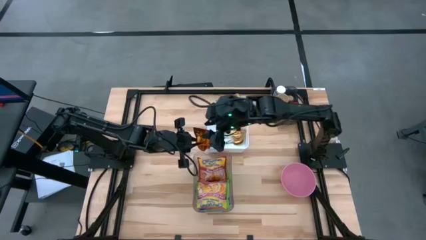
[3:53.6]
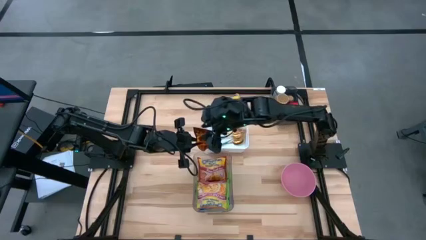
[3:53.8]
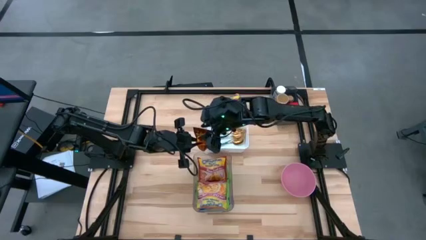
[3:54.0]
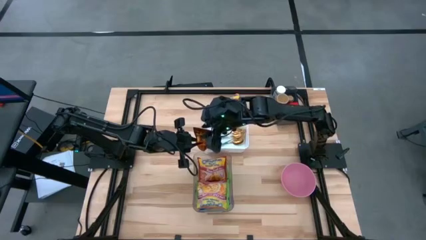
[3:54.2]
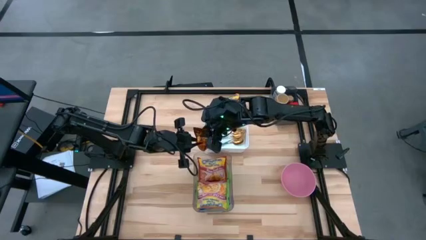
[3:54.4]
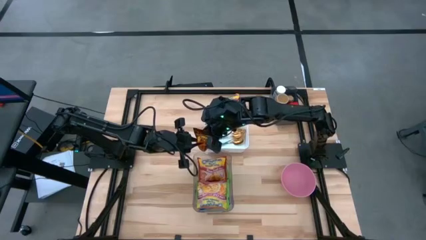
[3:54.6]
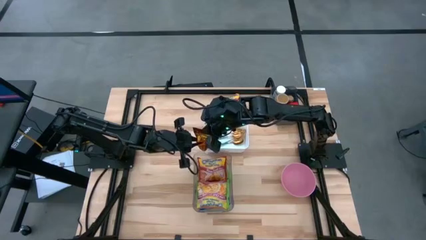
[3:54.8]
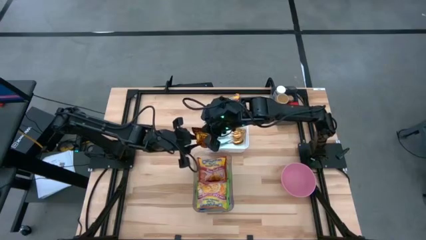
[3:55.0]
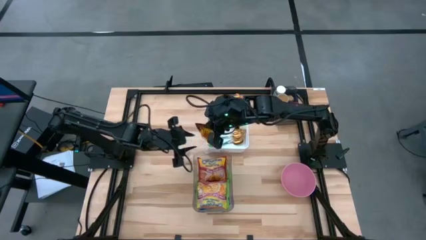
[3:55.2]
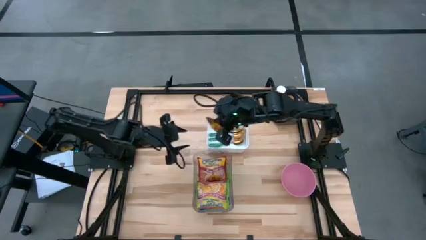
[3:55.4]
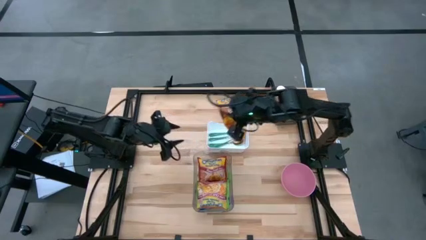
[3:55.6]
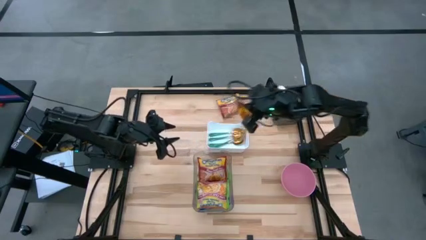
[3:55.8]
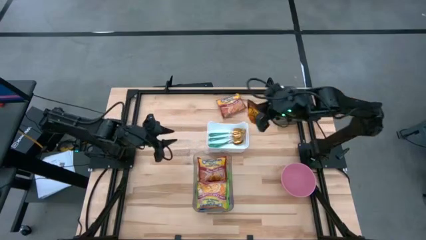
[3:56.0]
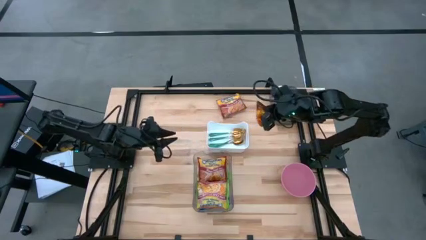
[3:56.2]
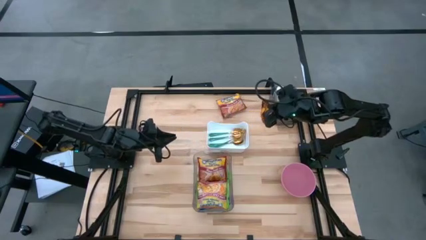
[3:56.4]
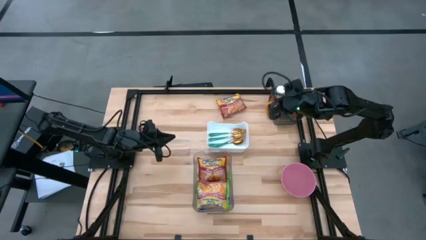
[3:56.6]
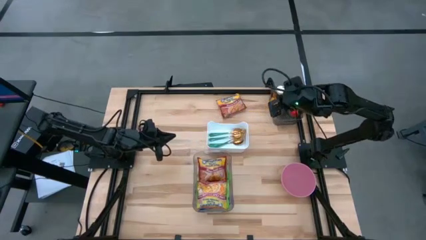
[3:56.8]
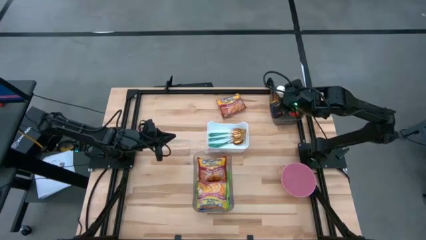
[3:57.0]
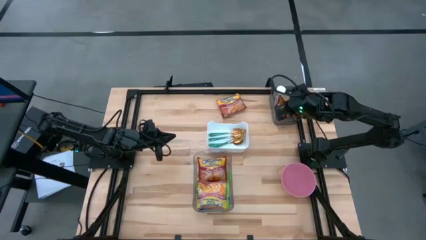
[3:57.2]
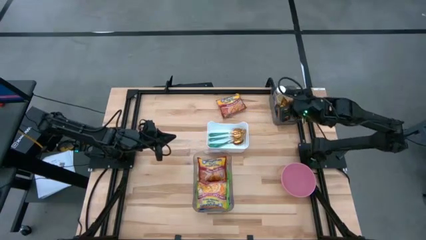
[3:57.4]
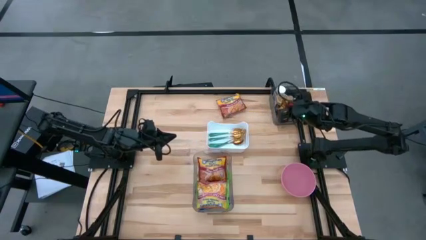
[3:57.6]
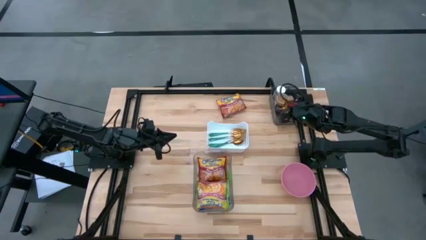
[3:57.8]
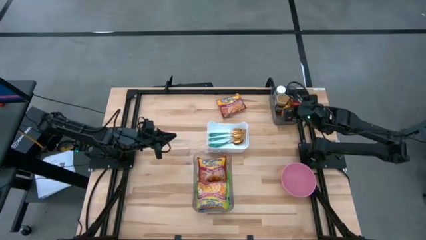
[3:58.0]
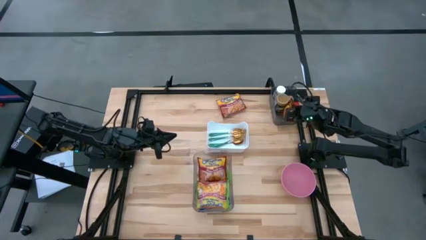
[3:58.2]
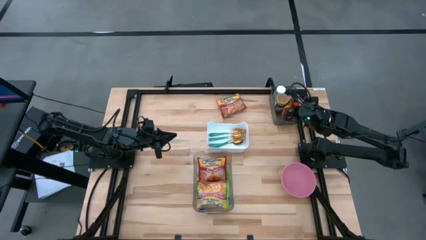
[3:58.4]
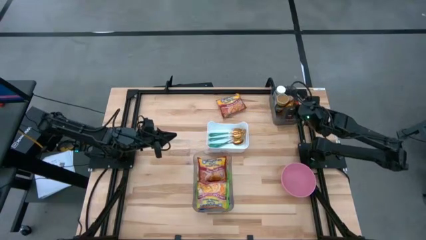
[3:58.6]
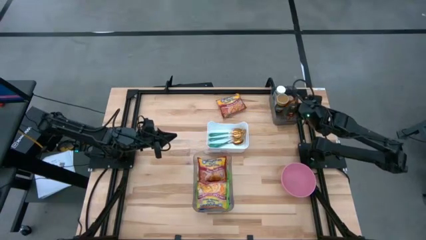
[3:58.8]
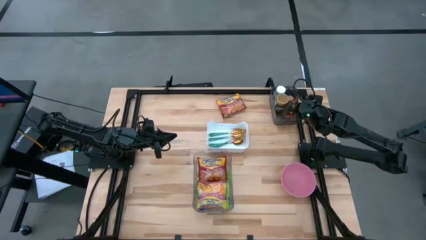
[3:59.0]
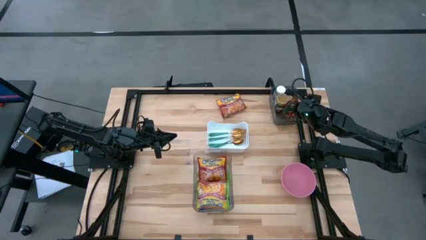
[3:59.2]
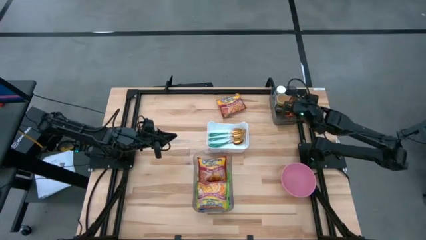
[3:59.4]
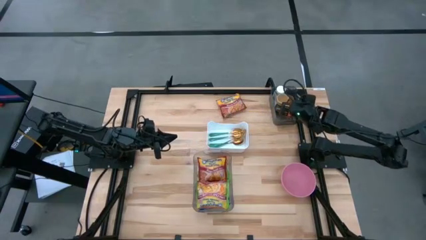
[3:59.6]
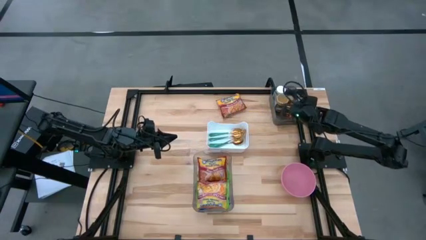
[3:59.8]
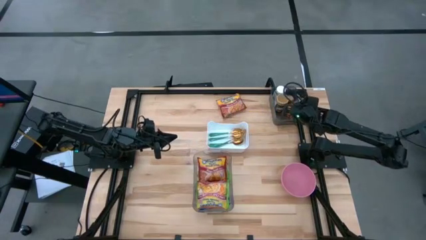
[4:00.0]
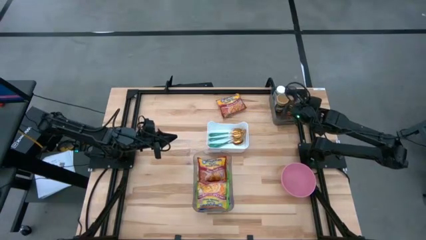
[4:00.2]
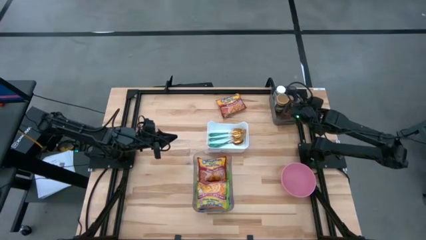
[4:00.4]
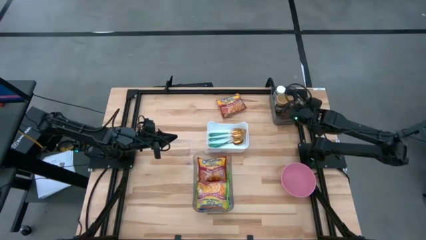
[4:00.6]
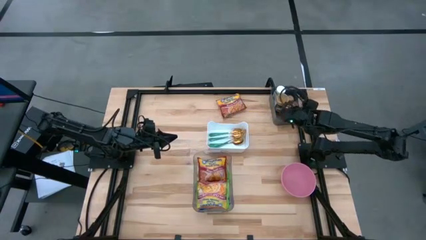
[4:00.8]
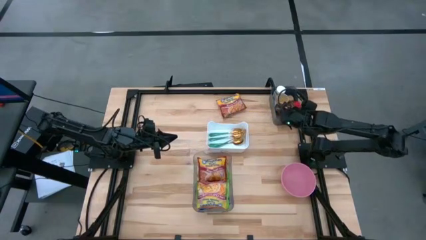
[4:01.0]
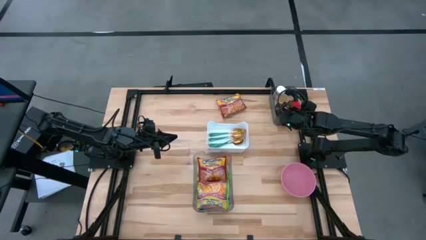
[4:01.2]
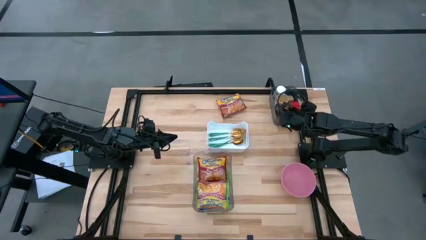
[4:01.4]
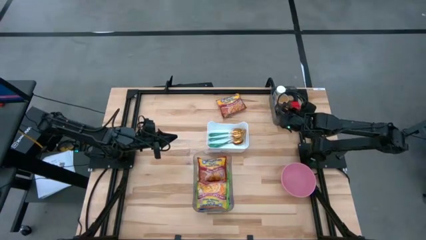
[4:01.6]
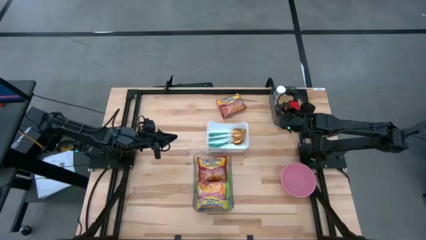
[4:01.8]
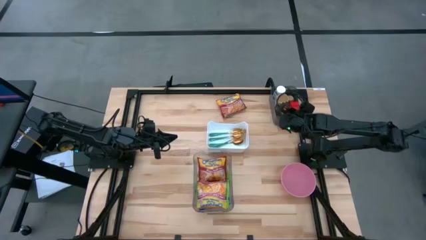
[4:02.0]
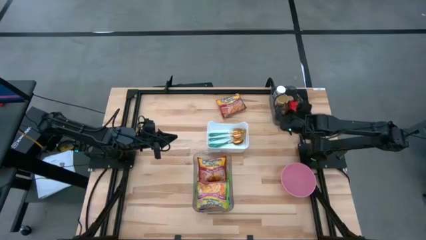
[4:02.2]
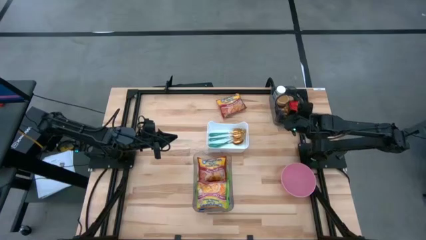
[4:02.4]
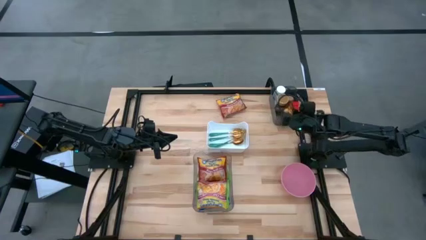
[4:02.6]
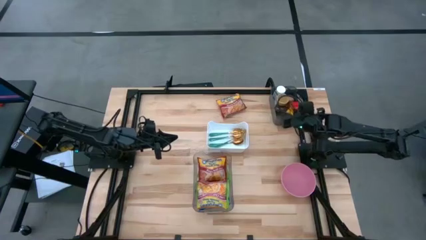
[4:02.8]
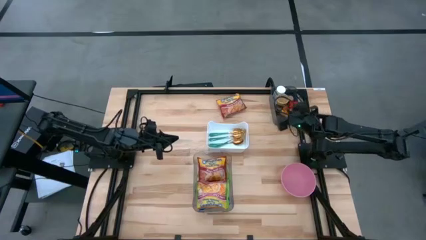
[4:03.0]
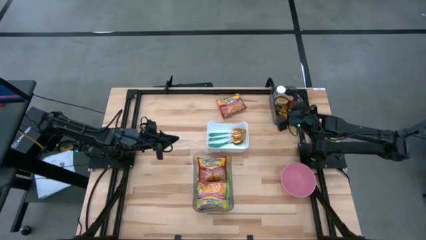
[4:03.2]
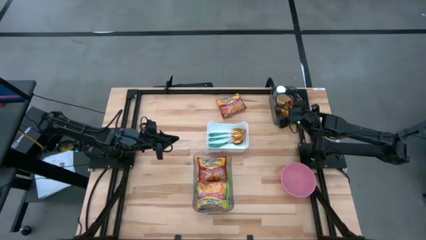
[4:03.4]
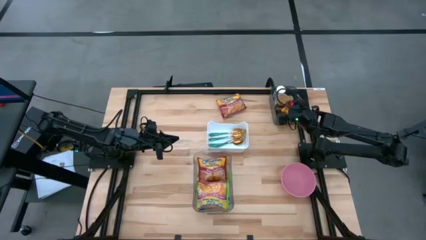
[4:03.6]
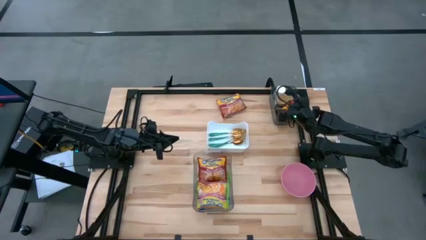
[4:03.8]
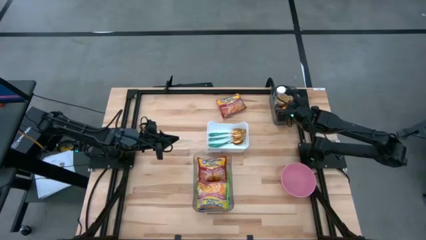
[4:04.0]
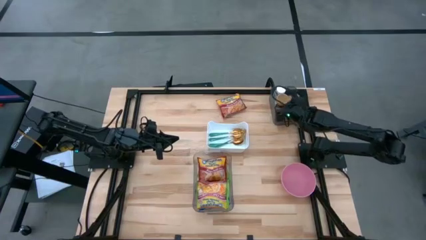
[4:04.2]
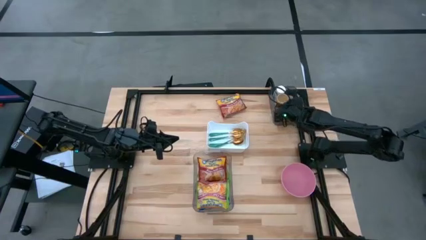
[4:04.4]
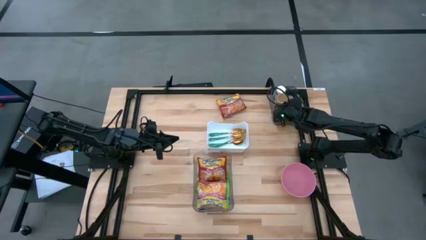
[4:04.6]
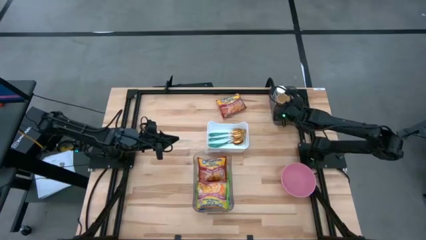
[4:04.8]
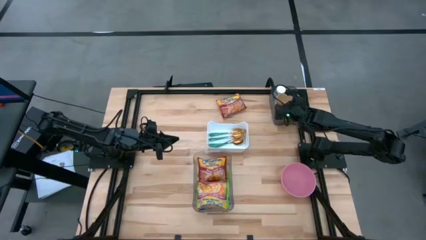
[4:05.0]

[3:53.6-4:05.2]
Task: Pick & Place Food Item
Put the orange spice pack into the black bin
